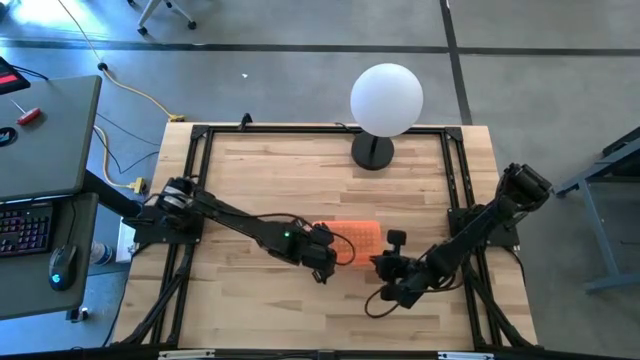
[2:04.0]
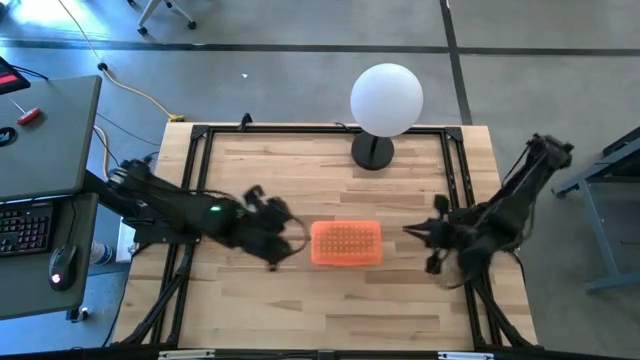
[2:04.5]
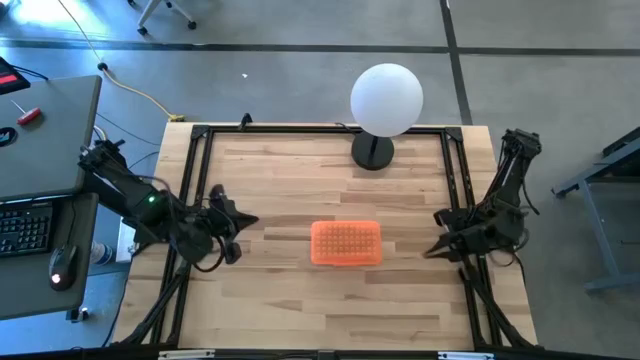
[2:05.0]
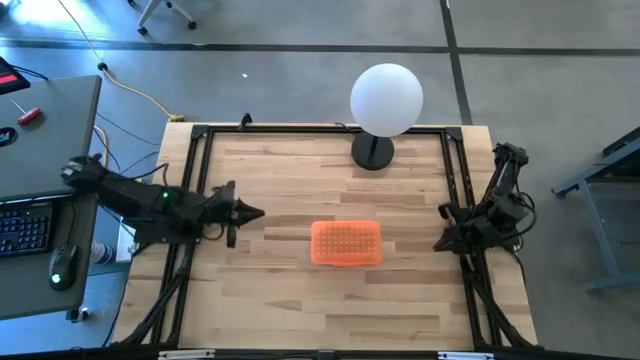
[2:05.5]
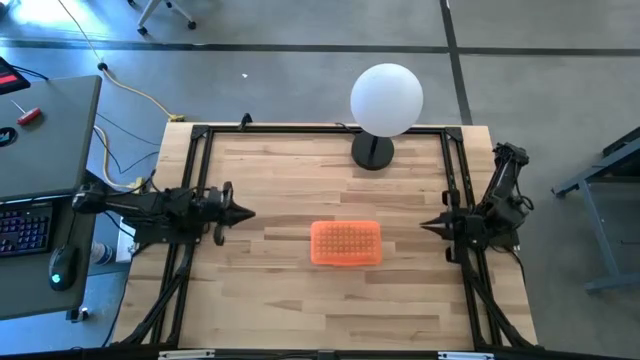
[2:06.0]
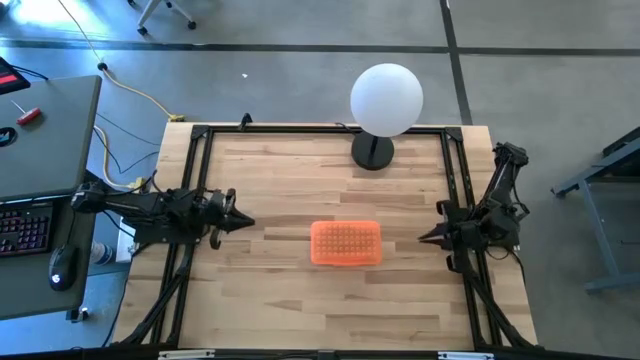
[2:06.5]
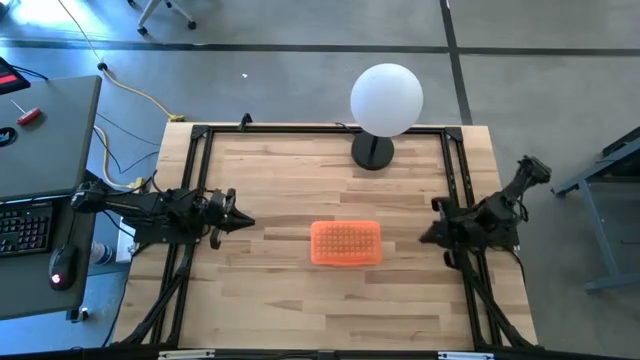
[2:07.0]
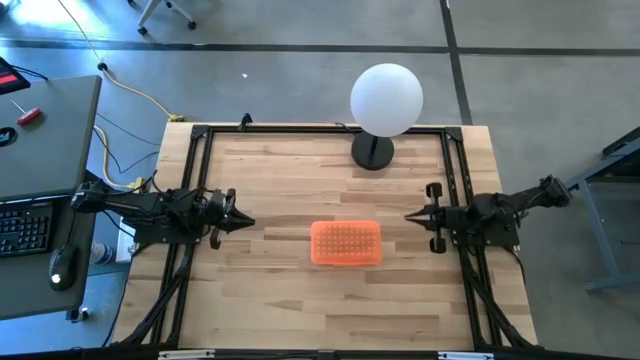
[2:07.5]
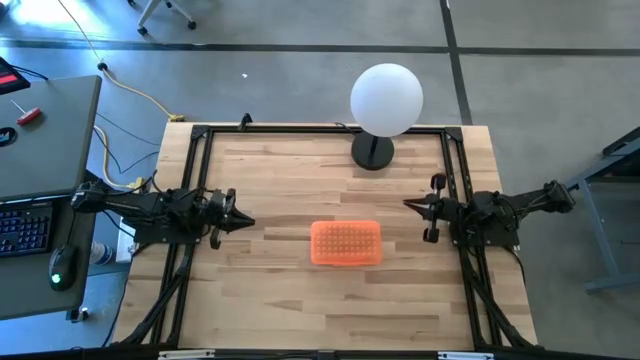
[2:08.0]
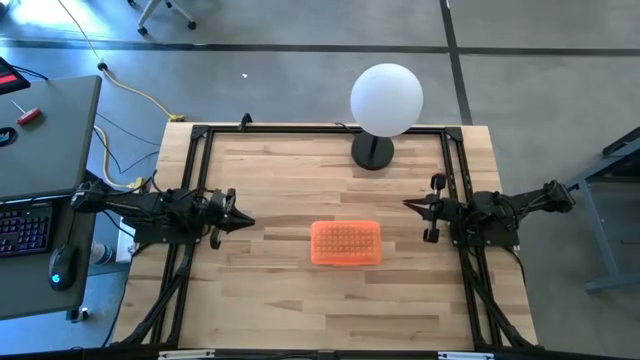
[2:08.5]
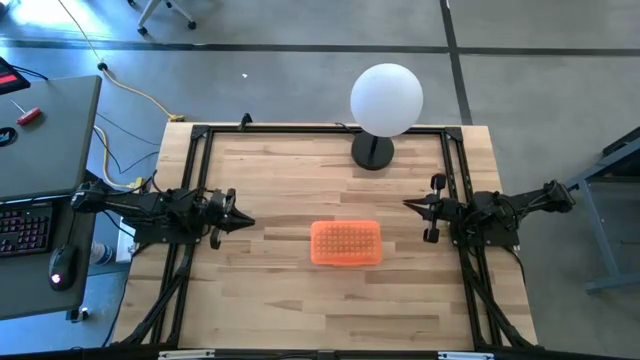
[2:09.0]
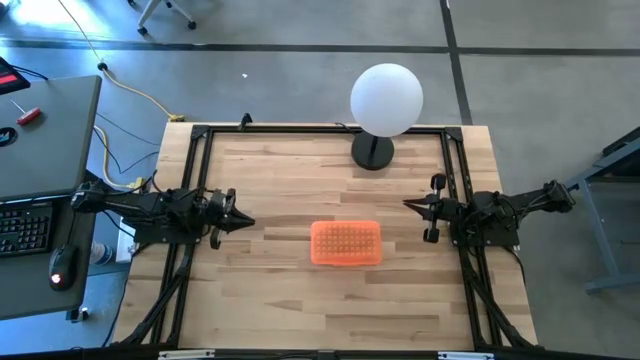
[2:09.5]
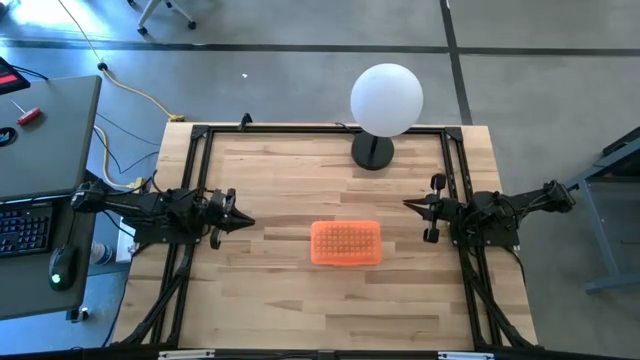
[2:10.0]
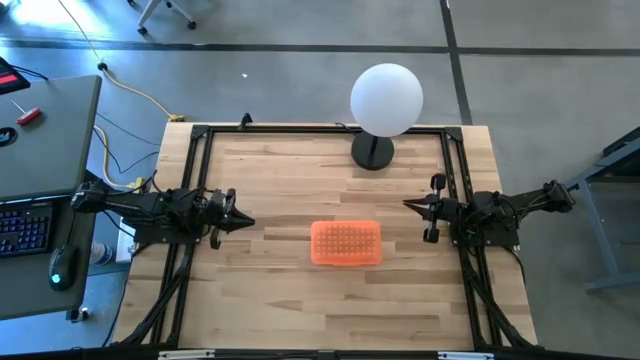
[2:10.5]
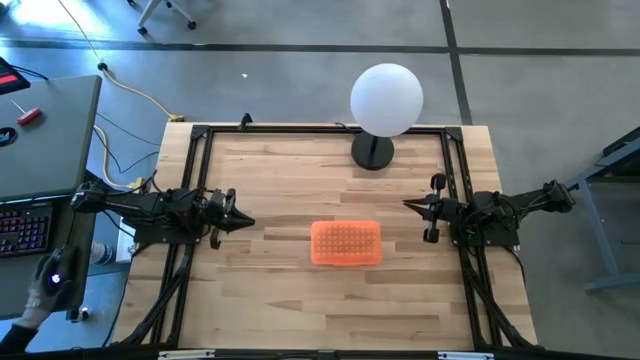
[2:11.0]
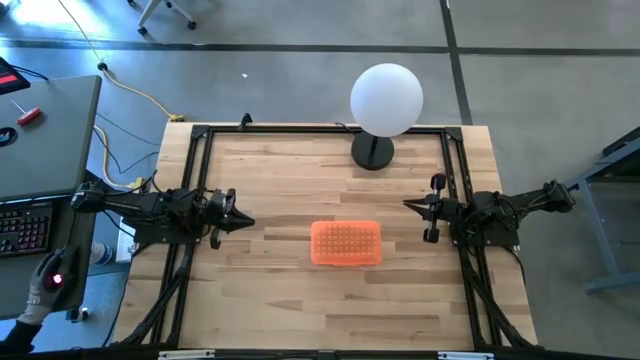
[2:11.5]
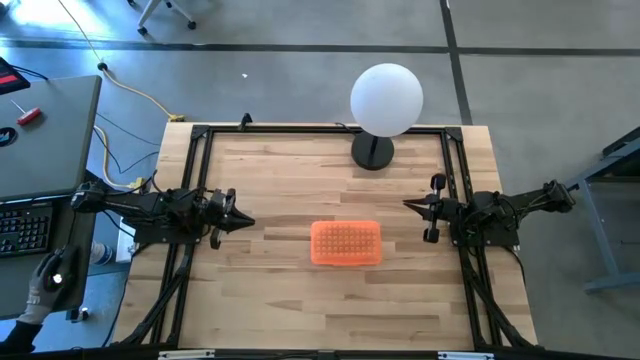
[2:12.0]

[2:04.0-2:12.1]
Task: Pick & place school supplies into a supply box
Return to Home Position

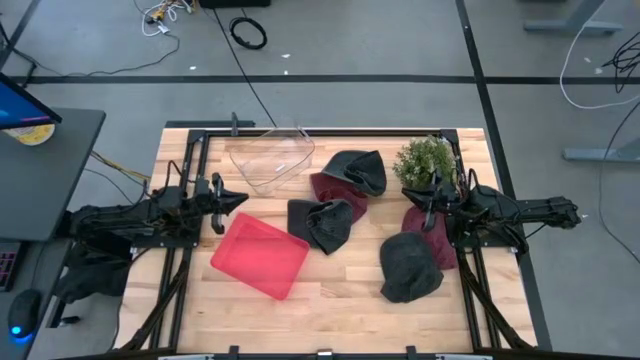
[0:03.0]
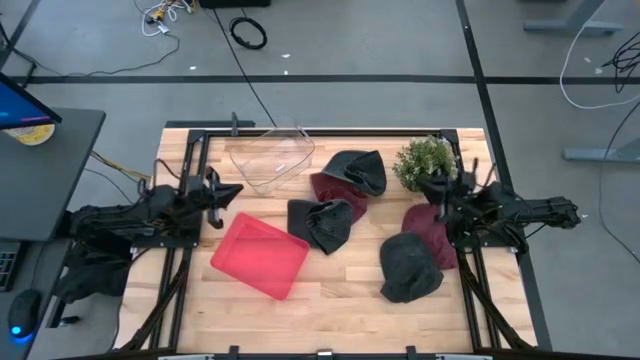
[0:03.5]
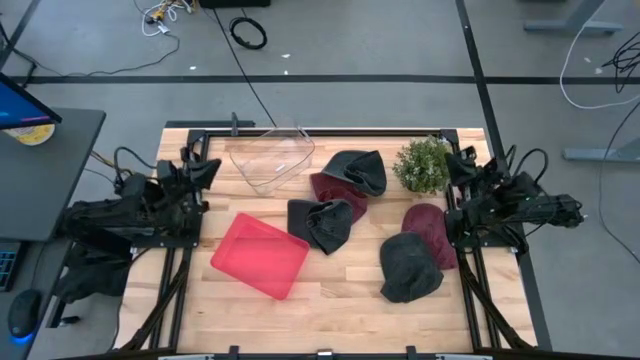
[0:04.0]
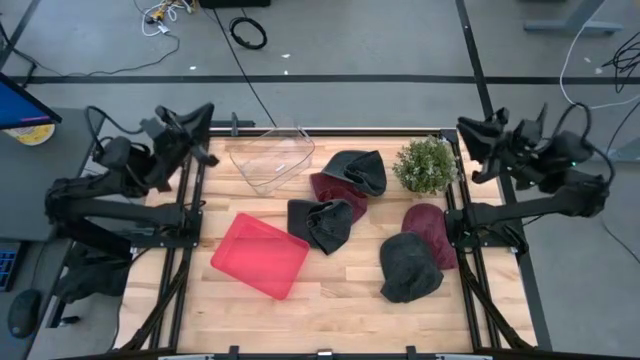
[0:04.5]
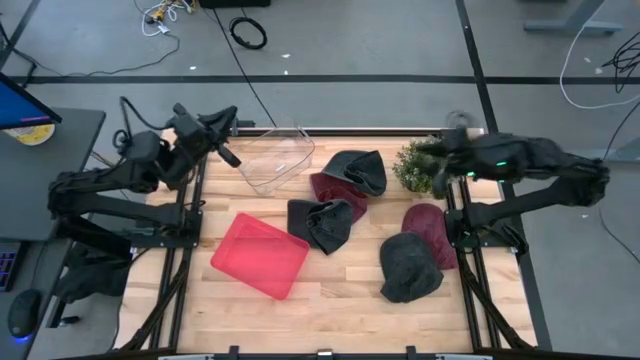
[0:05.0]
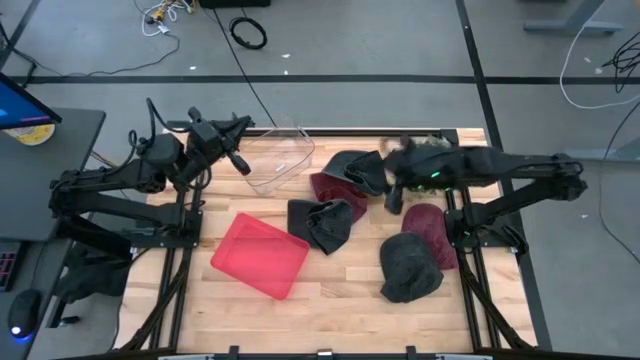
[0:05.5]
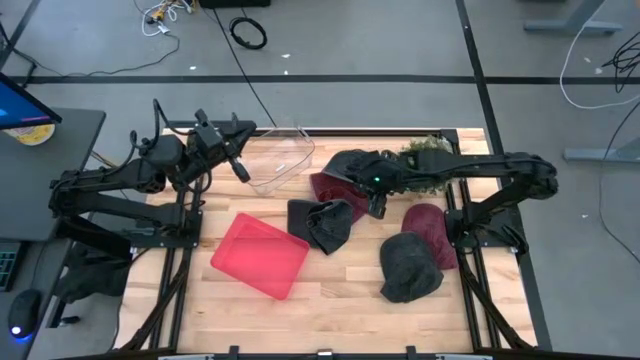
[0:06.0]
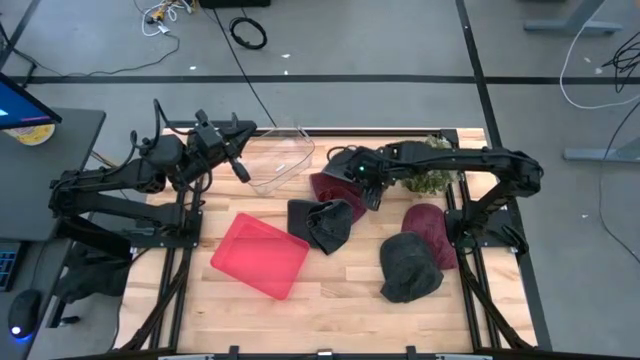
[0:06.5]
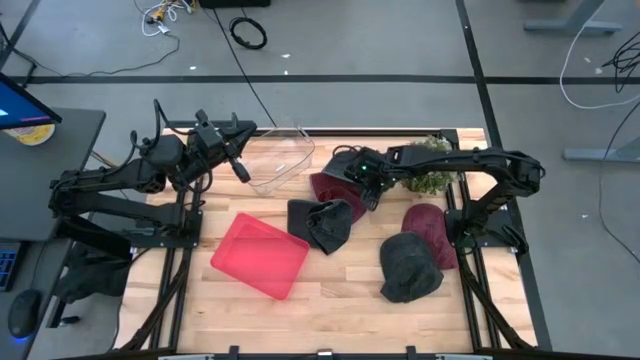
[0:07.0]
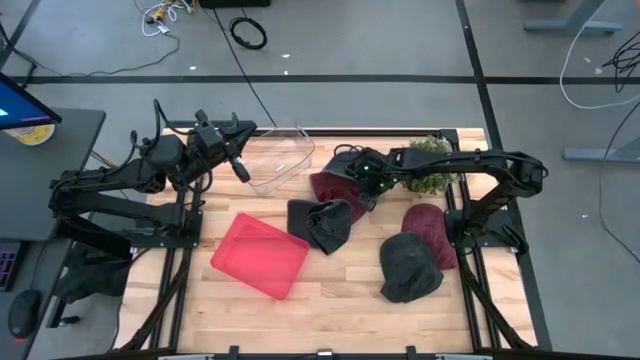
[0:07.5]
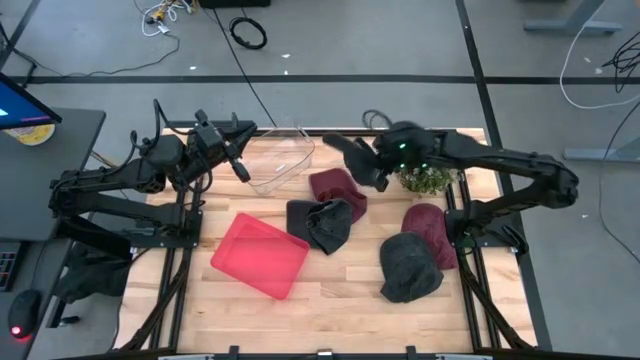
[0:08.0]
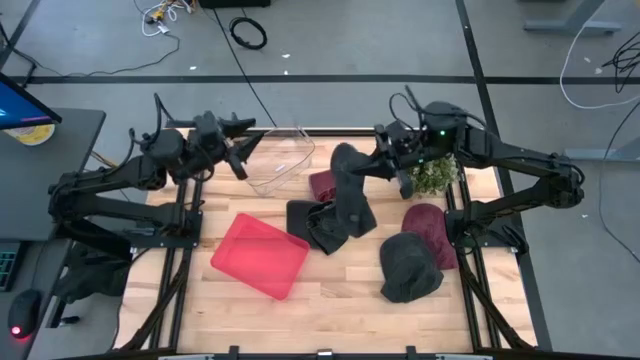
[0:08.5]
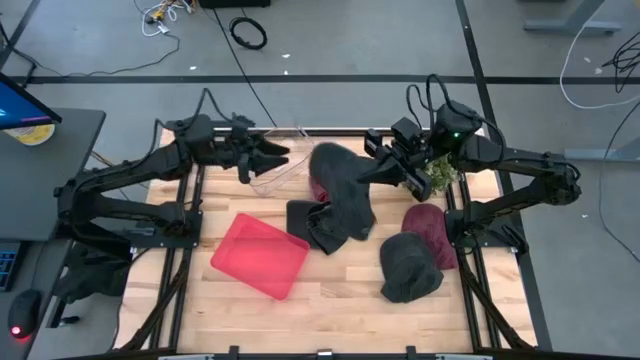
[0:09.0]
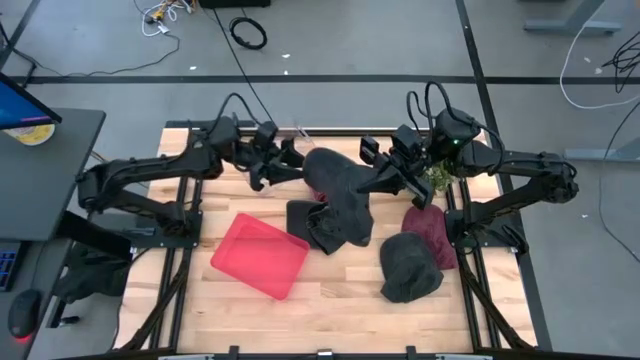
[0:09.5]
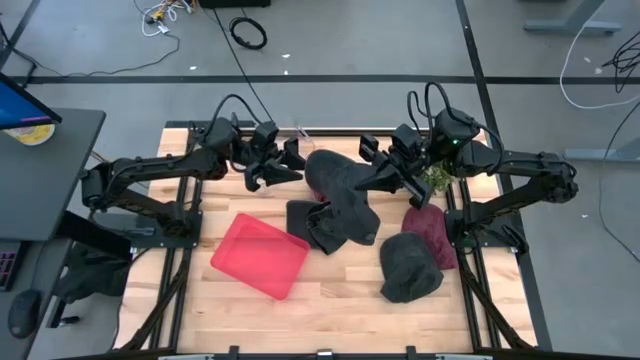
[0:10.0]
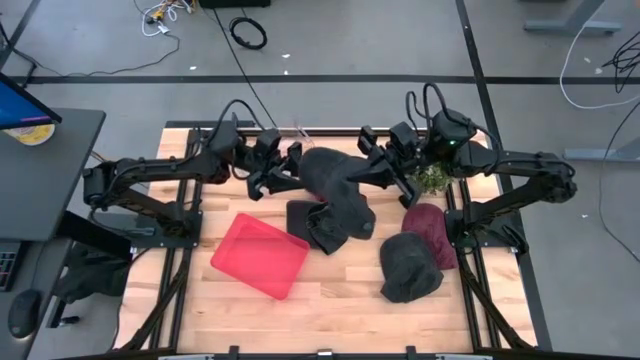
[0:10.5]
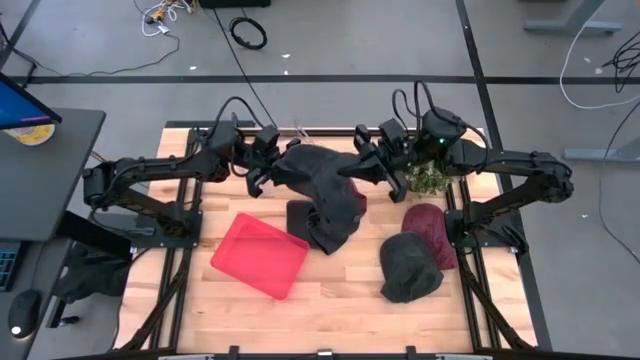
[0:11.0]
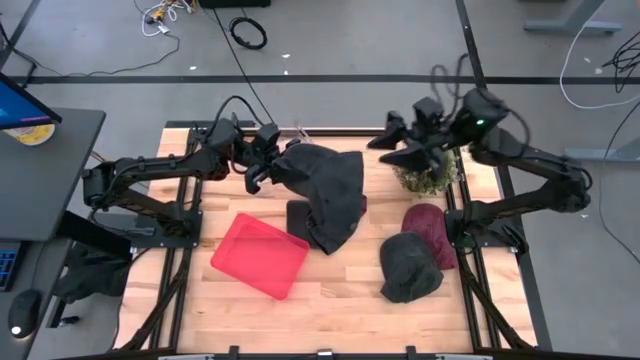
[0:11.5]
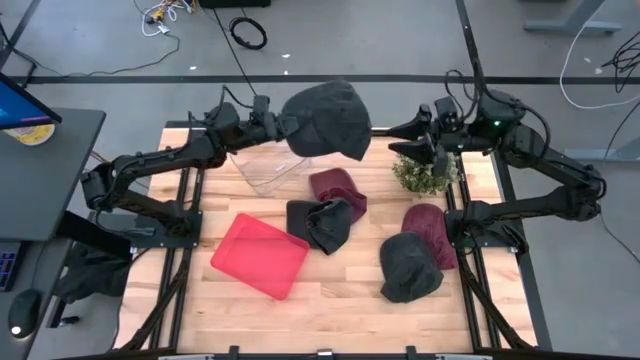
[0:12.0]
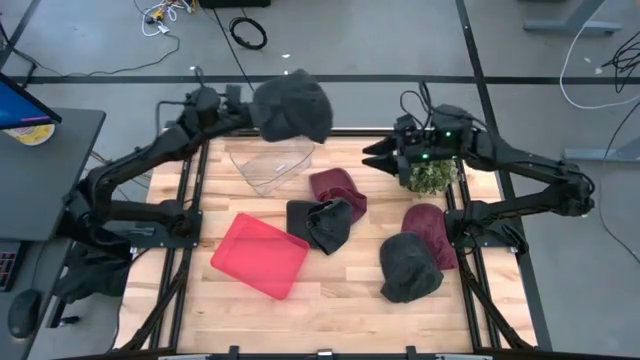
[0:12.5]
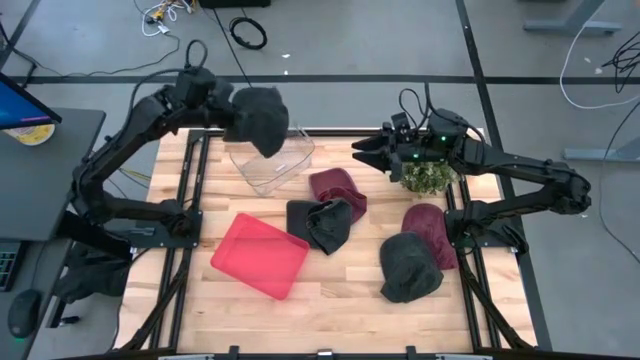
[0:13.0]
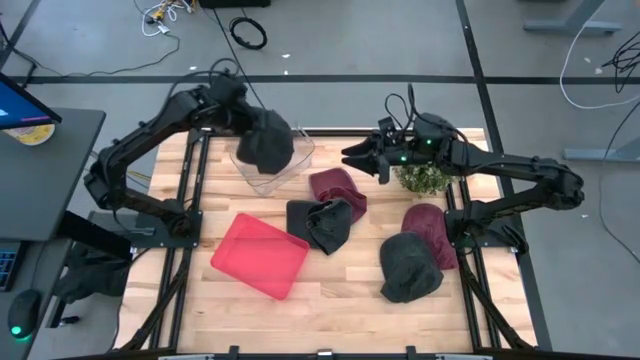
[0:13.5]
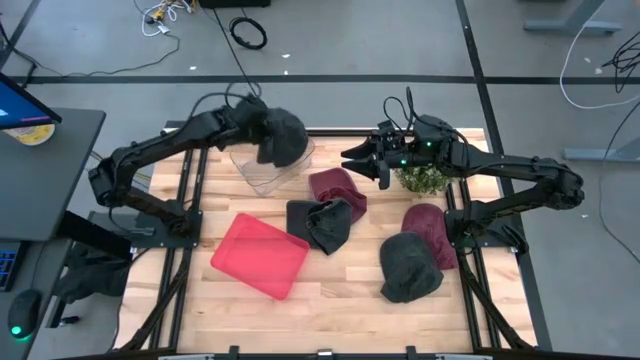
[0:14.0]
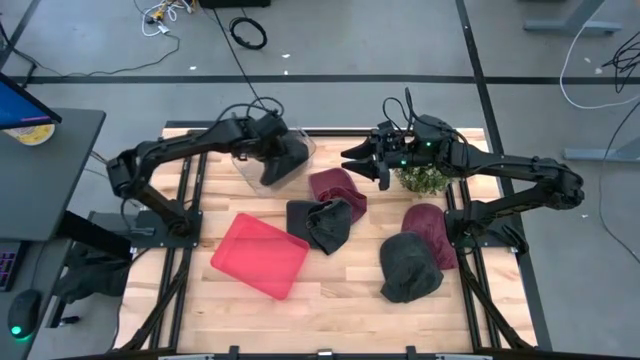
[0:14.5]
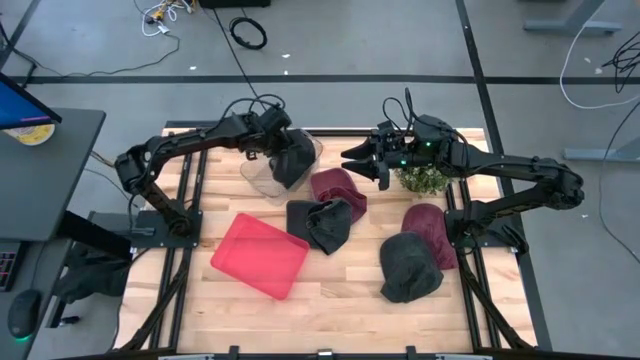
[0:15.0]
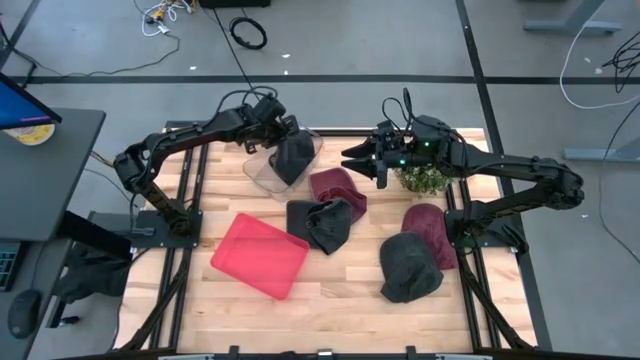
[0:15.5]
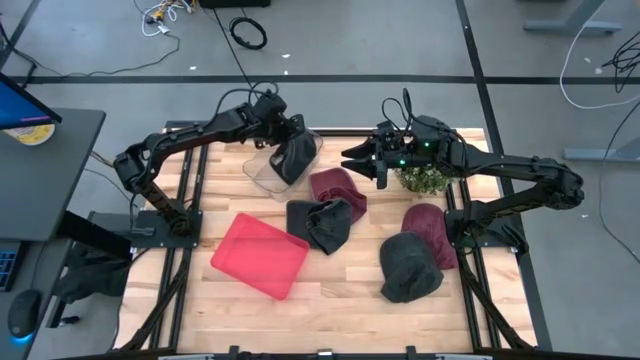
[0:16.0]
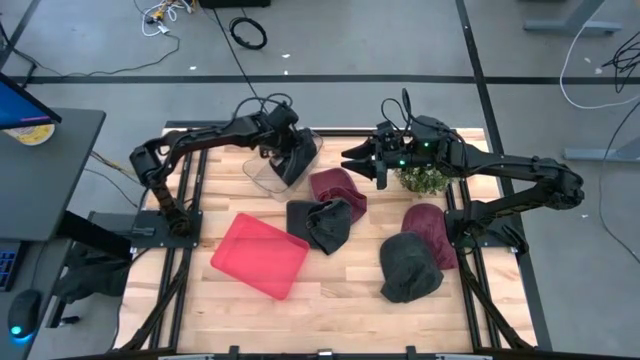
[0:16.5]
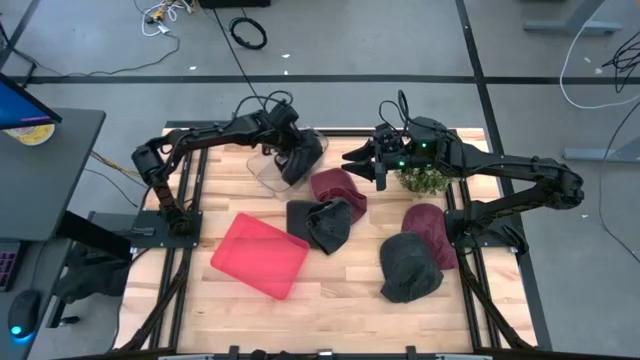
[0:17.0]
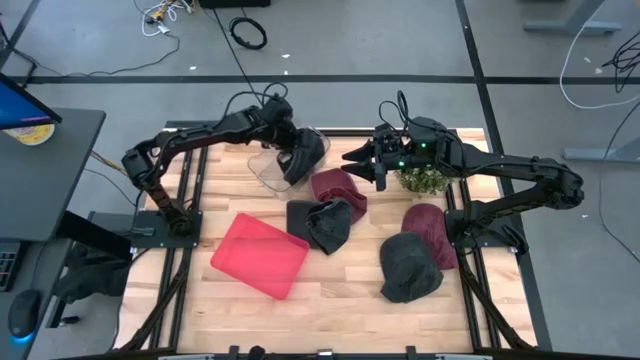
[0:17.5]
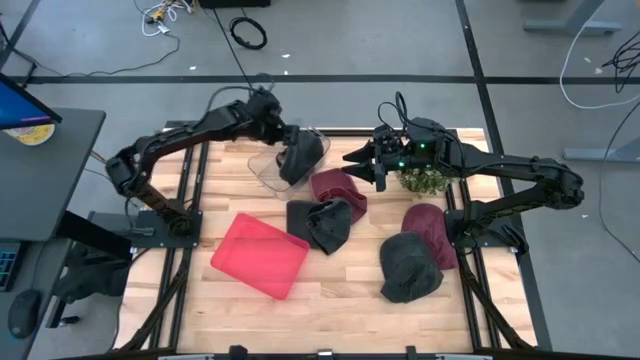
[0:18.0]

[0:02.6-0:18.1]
Task: Pick & Place hat
Put the top black cap into the transparent bin
